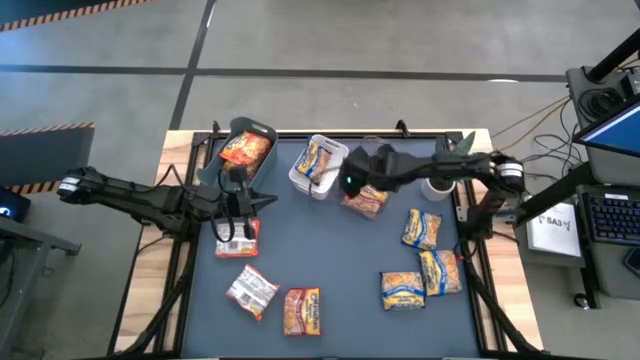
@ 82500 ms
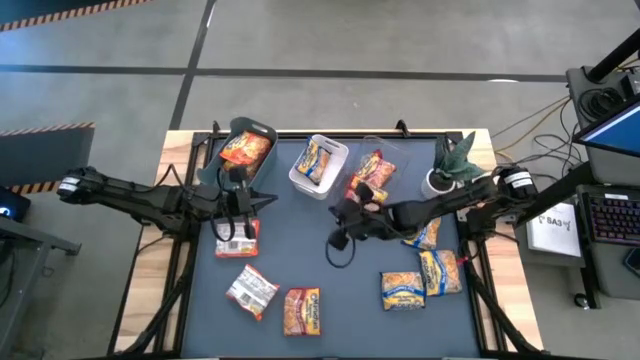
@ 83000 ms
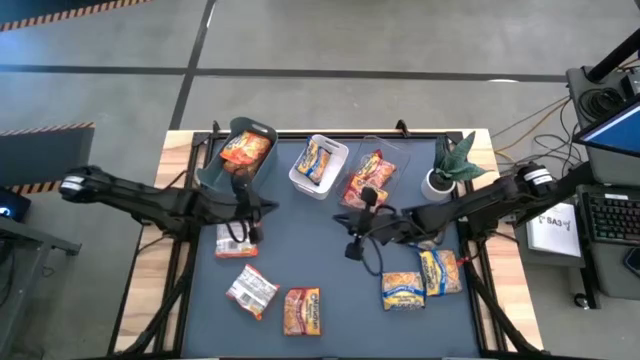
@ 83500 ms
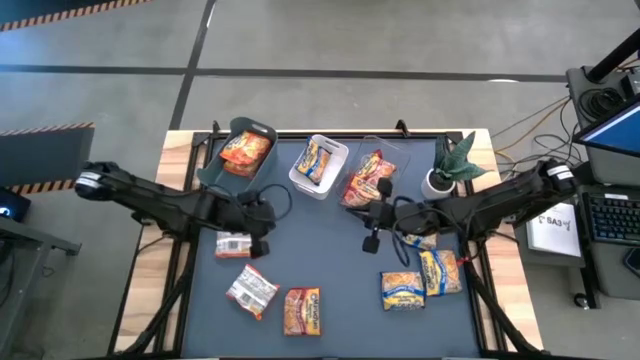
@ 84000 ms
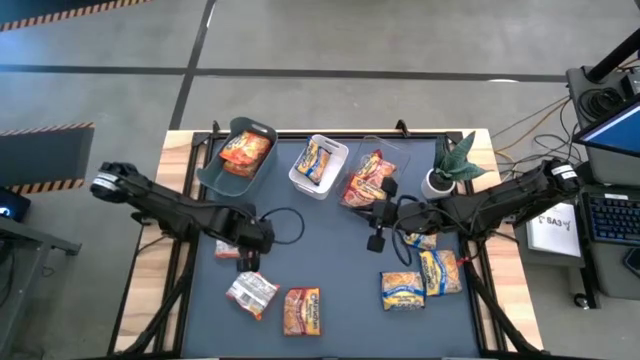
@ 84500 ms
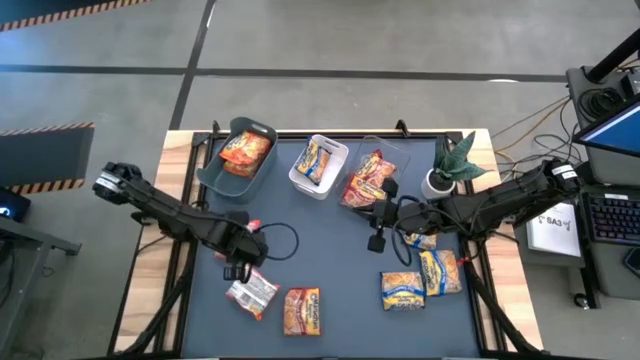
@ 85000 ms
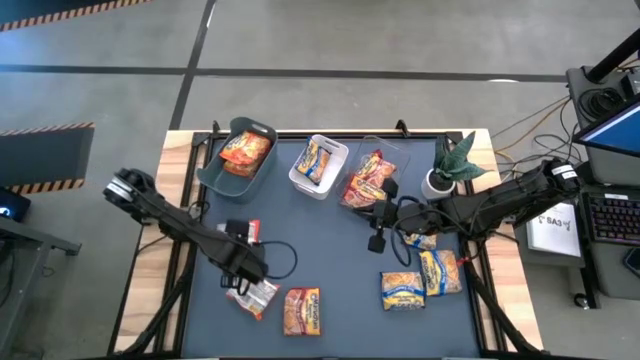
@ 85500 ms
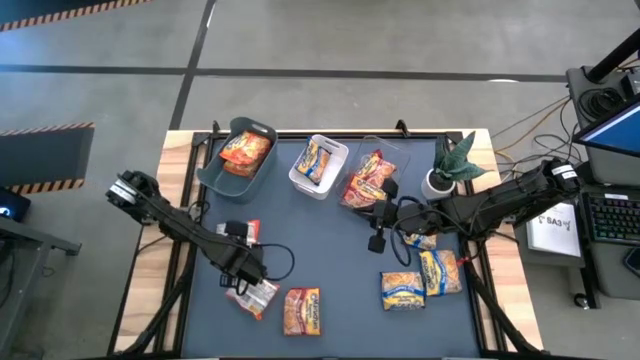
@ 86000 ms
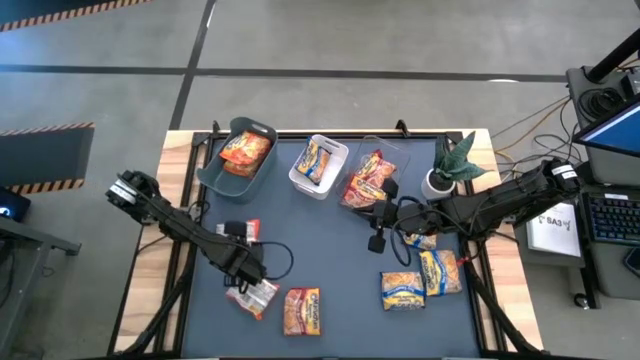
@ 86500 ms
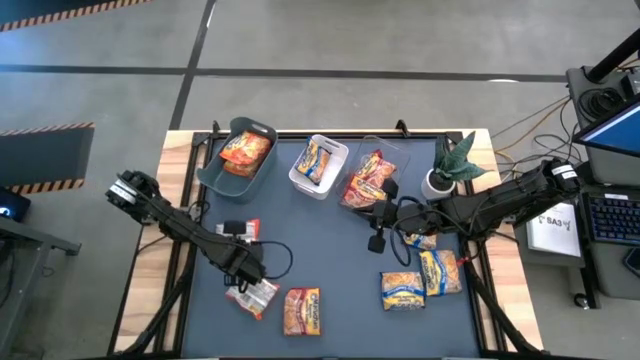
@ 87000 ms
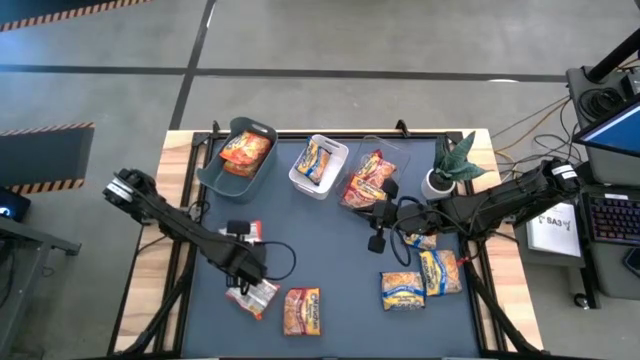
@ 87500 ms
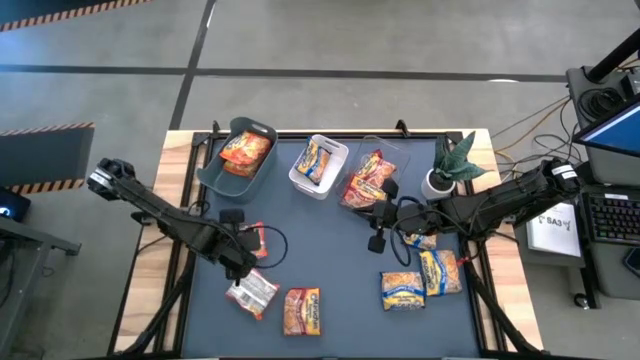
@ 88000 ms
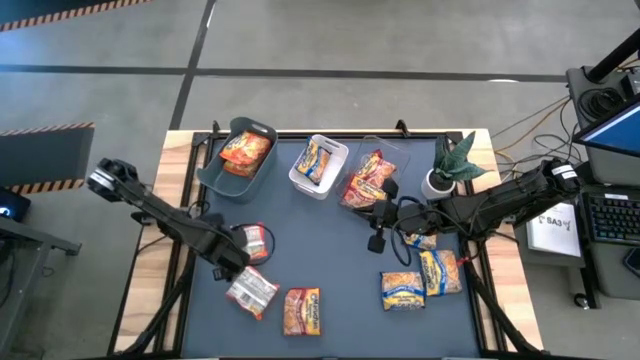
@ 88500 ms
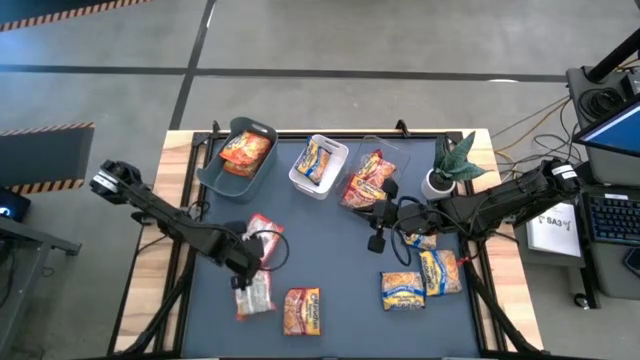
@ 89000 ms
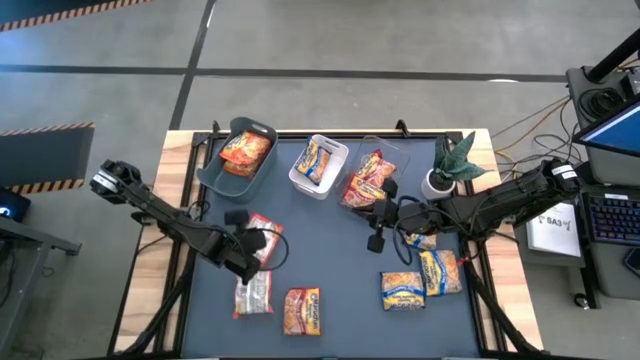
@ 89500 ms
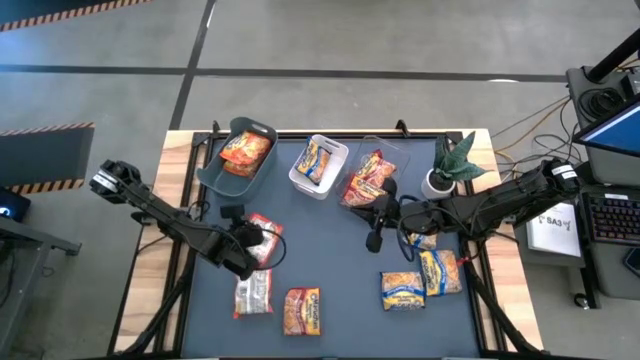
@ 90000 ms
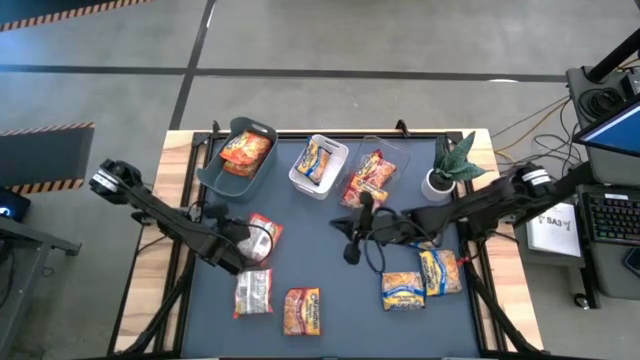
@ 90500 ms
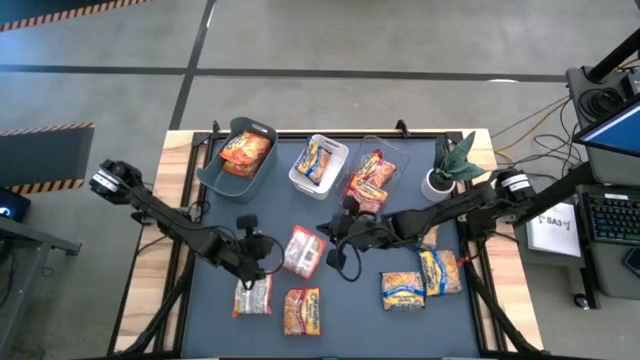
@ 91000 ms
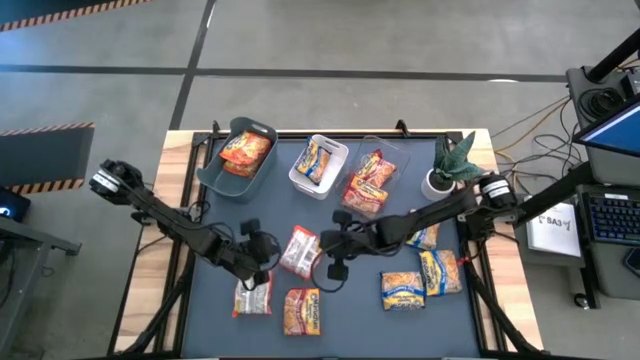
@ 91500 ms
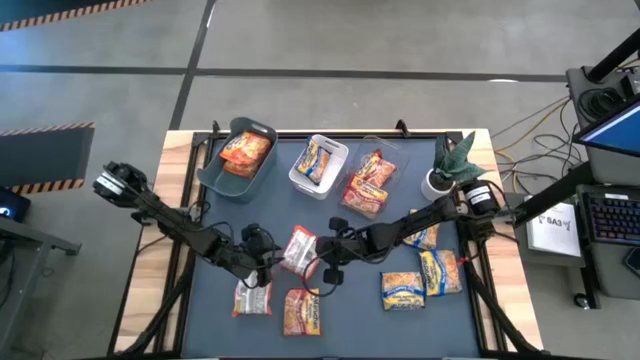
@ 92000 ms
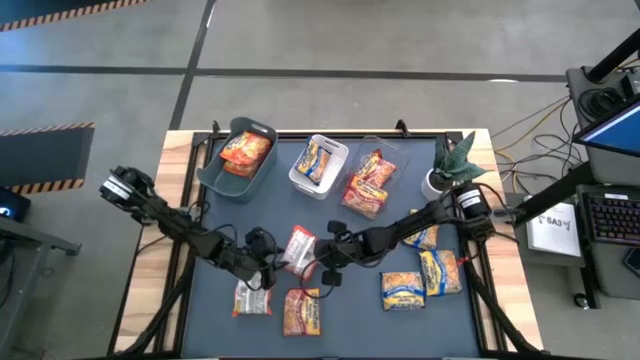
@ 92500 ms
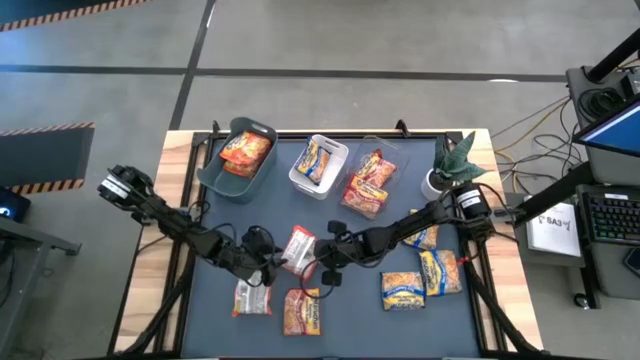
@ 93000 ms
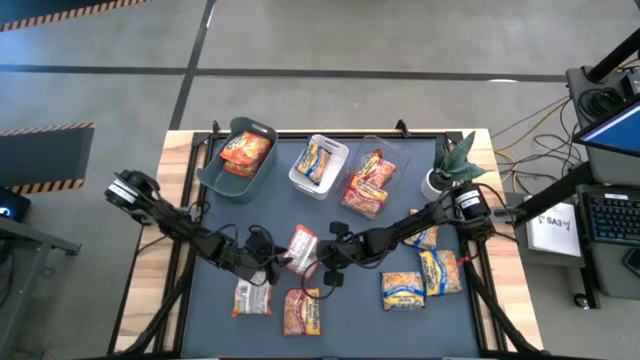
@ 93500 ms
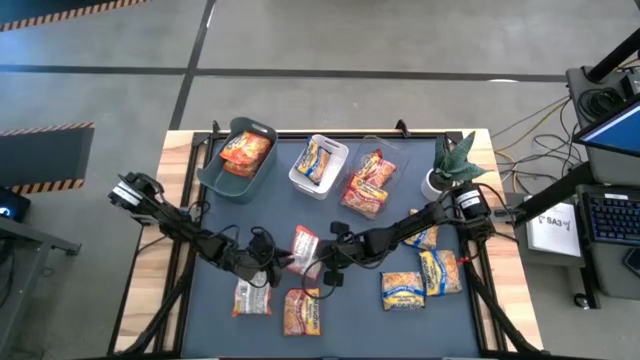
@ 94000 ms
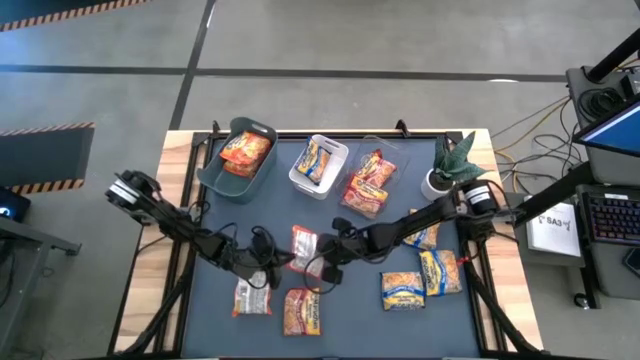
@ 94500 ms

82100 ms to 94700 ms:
Task: Sort Maruchan noodles
Put the orange noodle pack into the blue bin

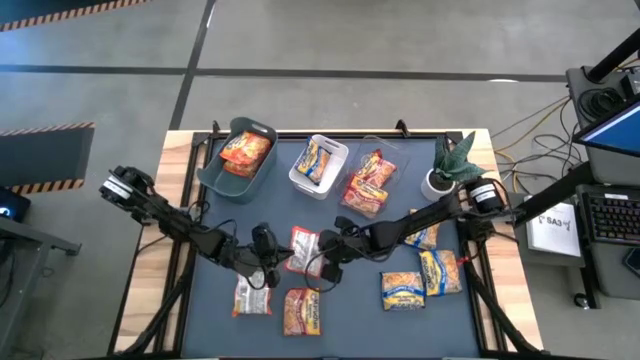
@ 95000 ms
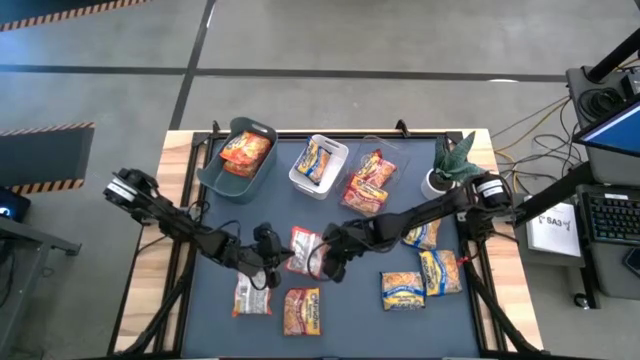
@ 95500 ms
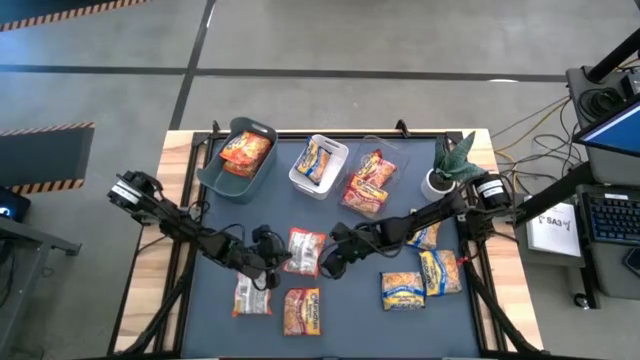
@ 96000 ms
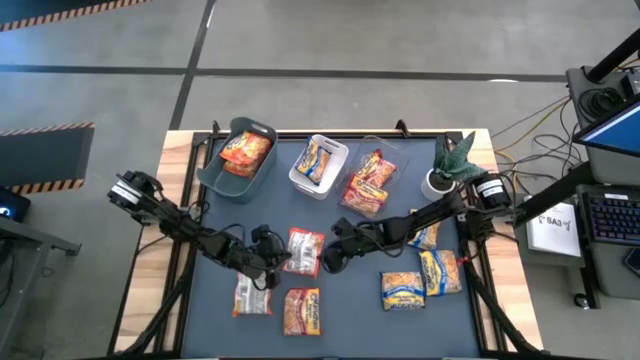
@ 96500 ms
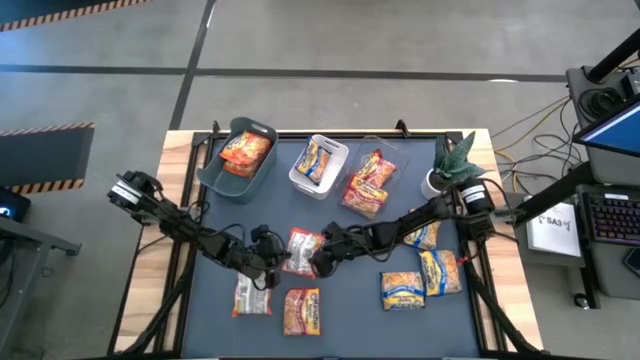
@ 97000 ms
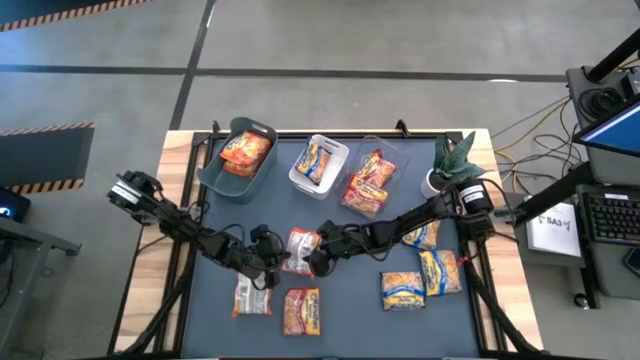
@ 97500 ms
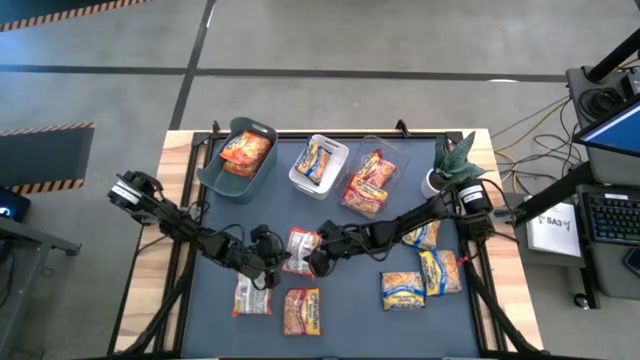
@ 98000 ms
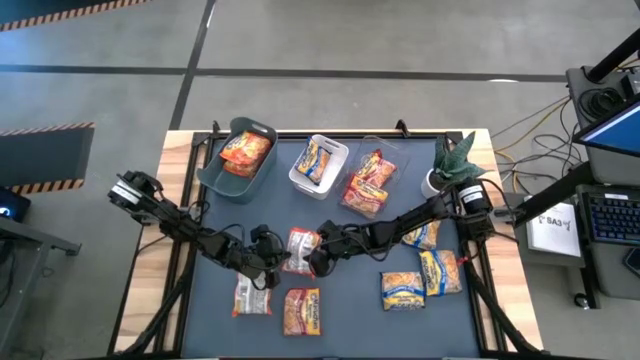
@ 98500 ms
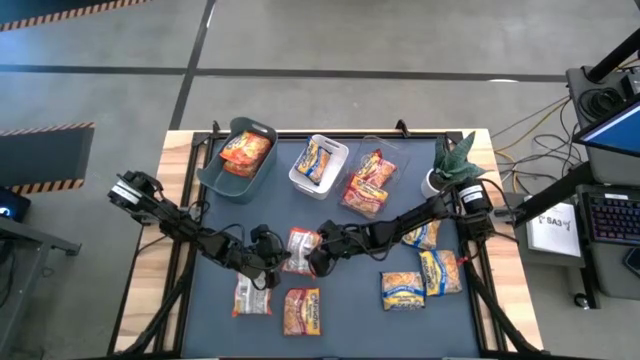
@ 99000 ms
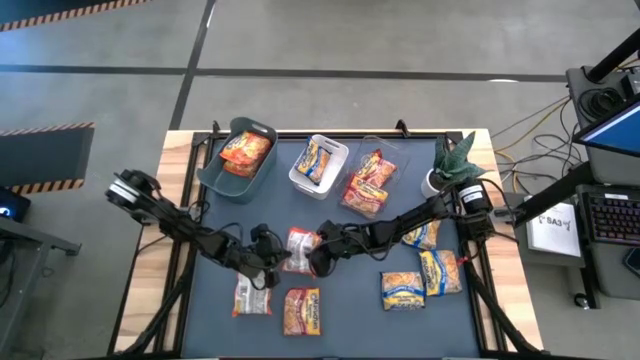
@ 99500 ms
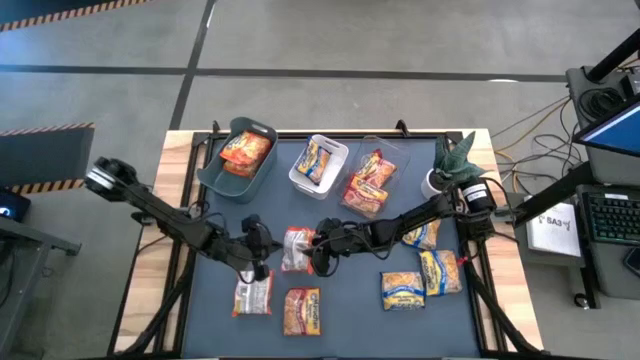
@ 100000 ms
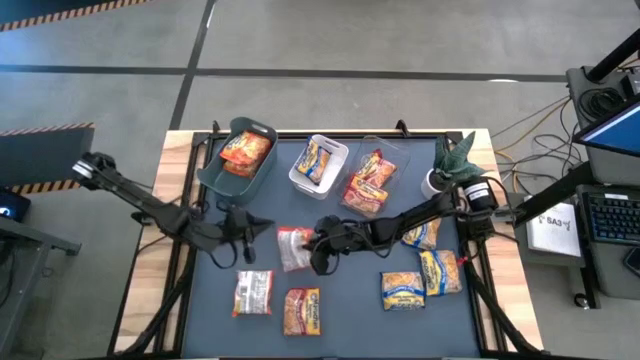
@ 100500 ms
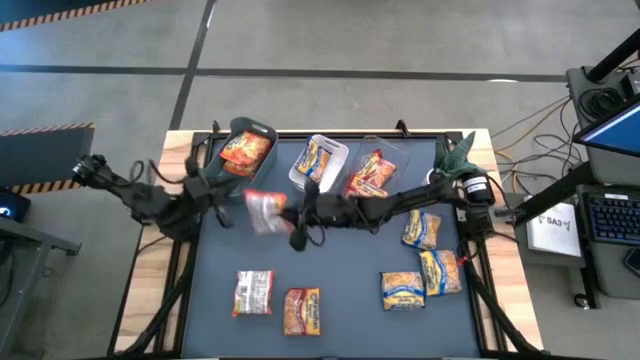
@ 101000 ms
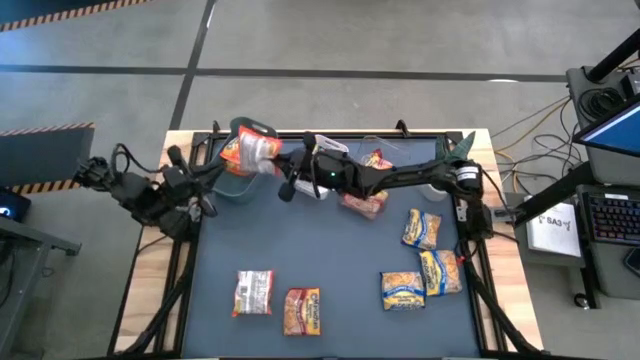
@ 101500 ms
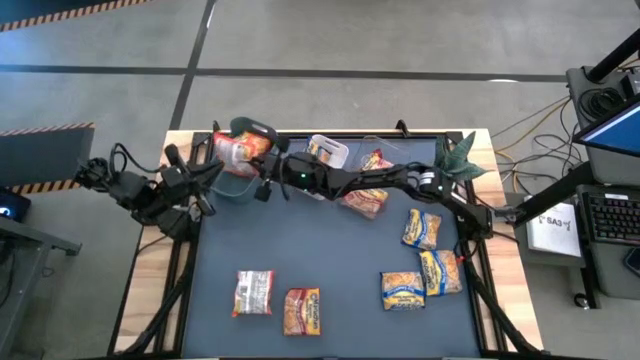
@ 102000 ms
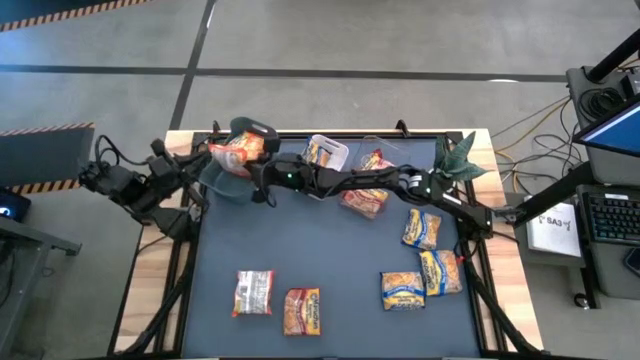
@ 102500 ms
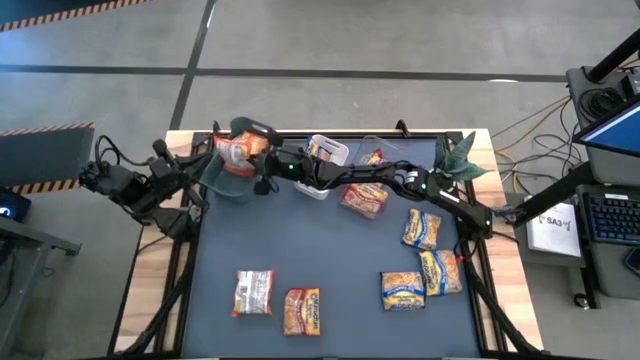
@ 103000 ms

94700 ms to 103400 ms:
Put the orange noodle pack into the blue bin
